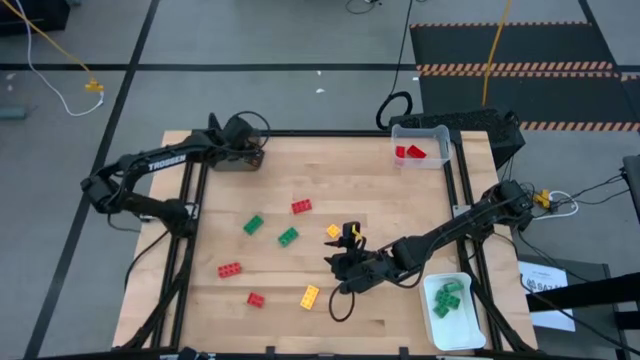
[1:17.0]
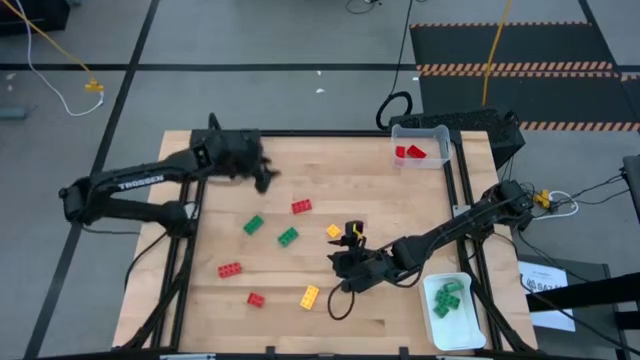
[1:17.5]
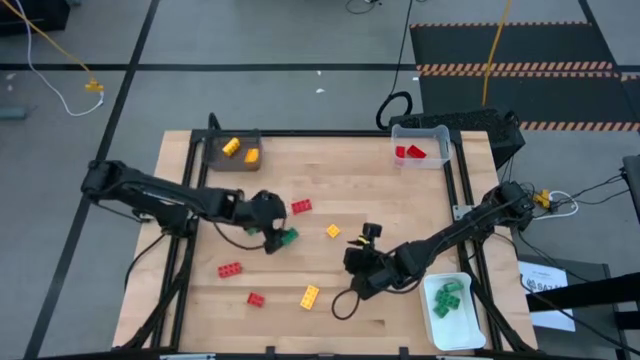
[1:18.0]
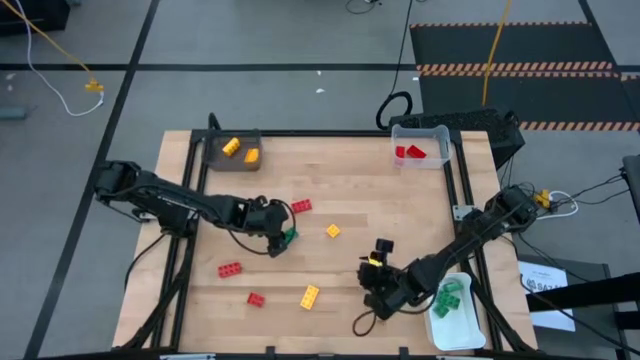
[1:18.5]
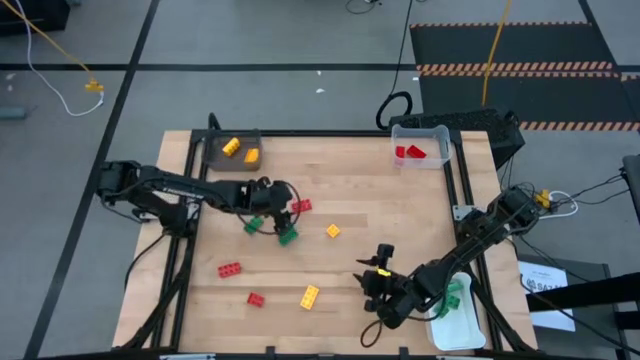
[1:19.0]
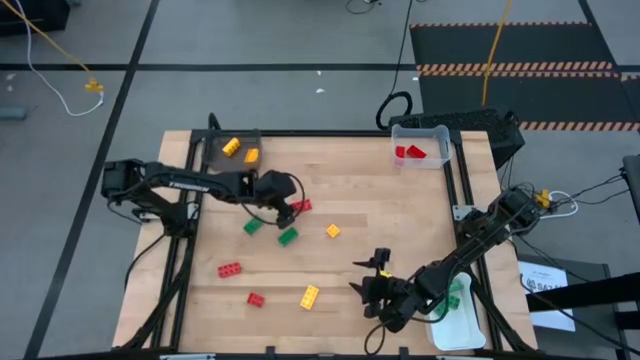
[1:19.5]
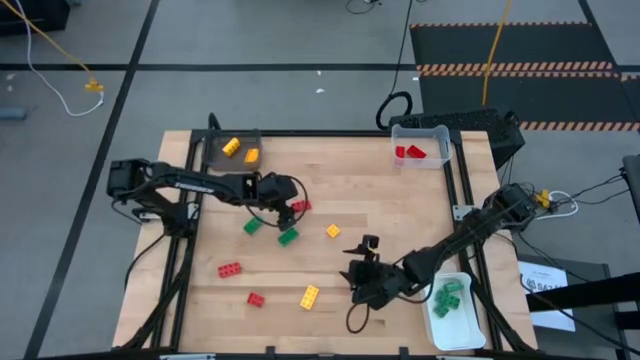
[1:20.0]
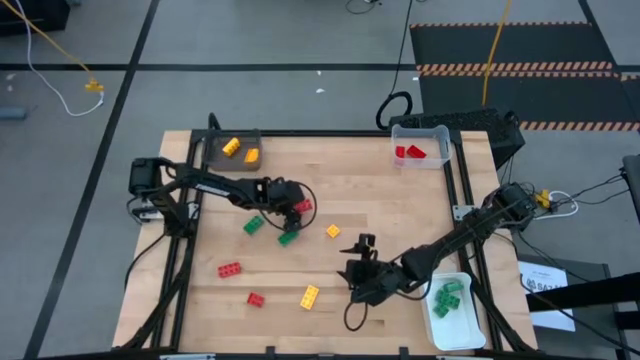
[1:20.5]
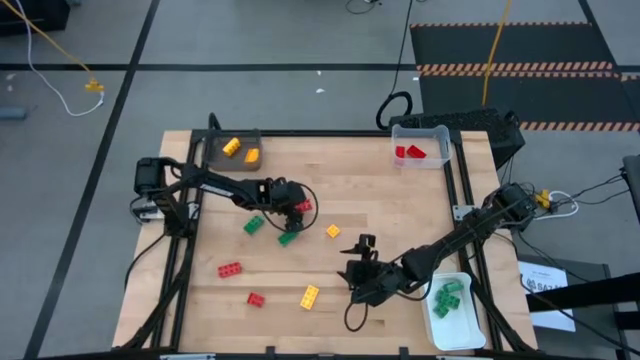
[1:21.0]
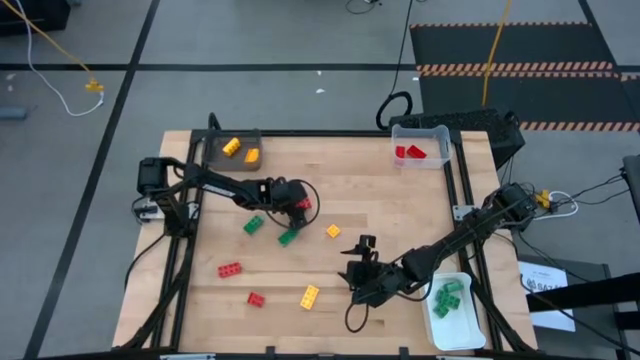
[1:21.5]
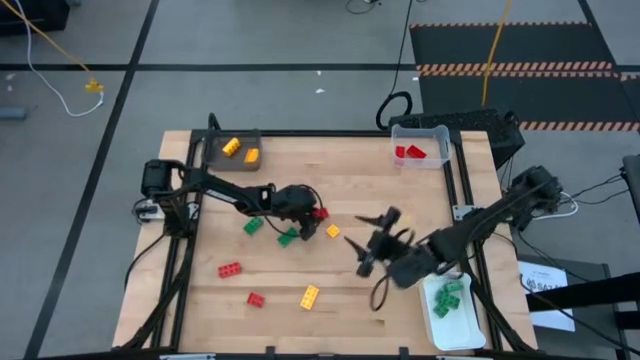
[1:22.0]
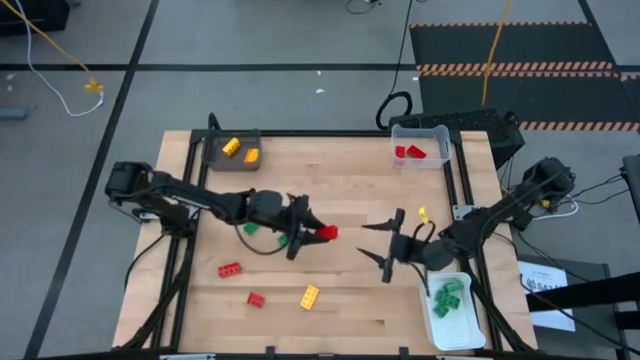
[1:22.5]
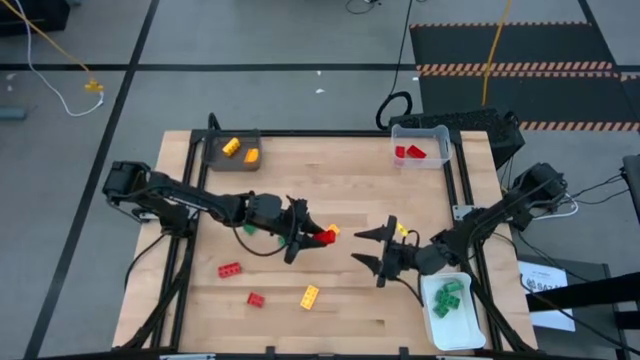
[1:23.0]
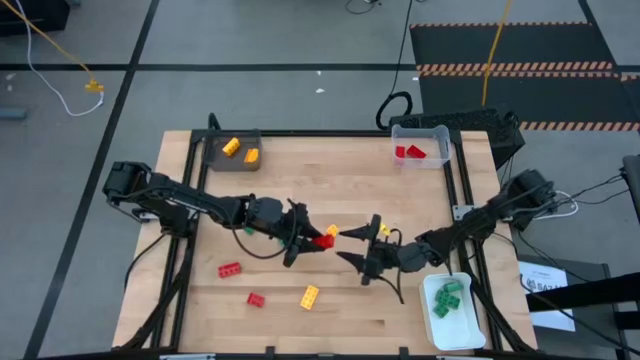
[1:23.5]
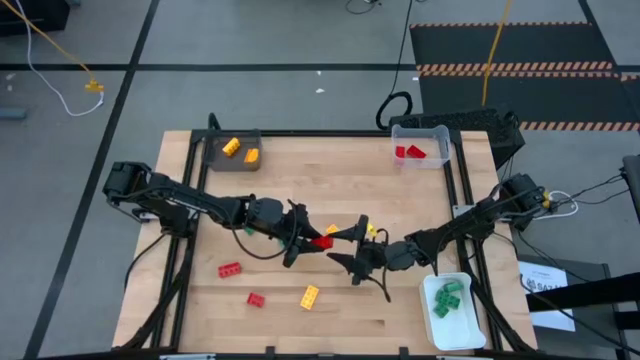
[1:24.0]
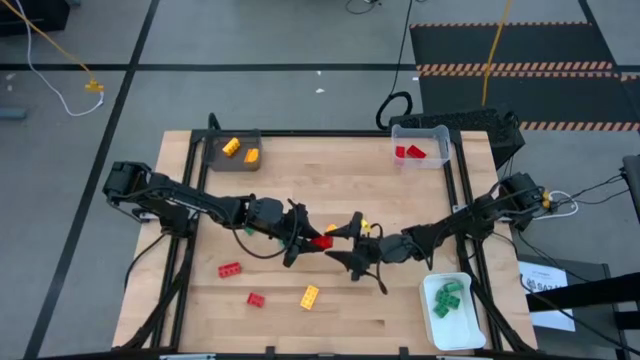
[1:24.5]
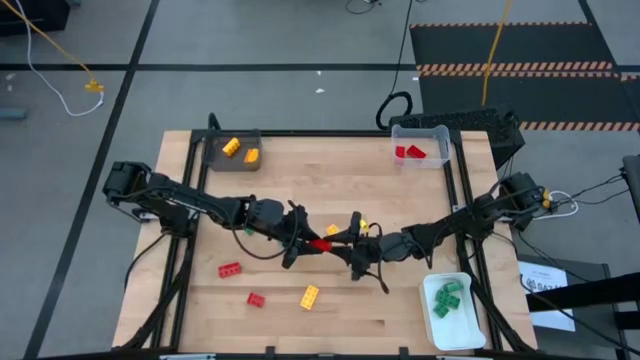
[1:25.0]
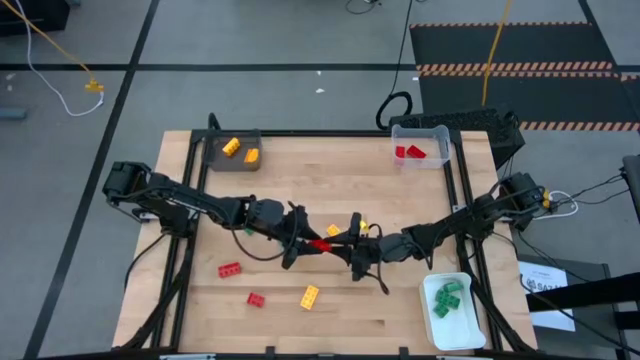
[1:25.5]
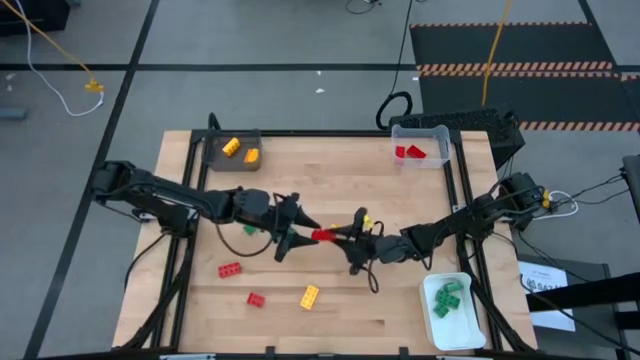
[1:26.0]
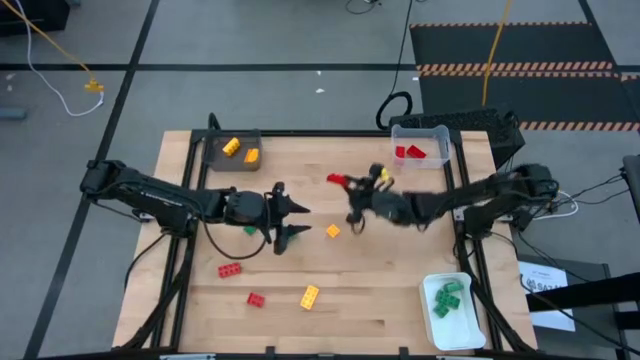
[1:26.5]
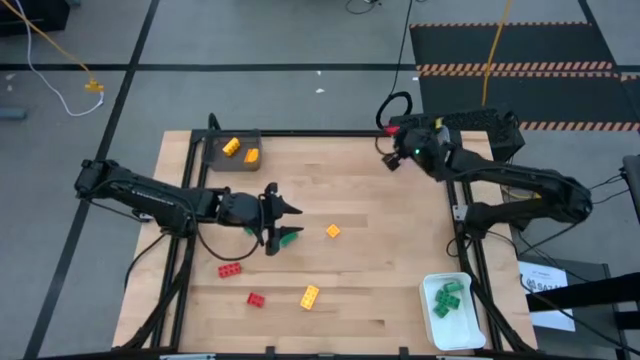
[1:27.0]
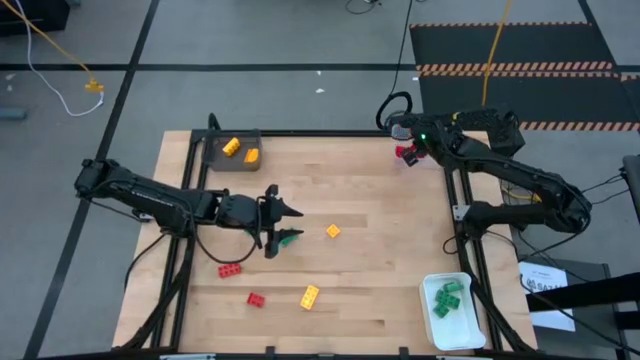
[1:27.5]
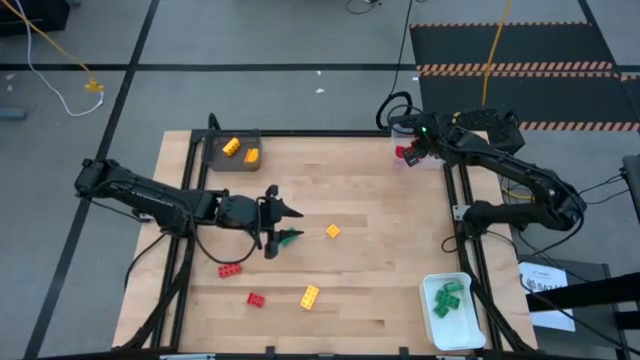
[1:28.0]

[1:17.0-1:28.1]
Task: Sort & place blocks by color
Put the red gamepiece into the transparent bin

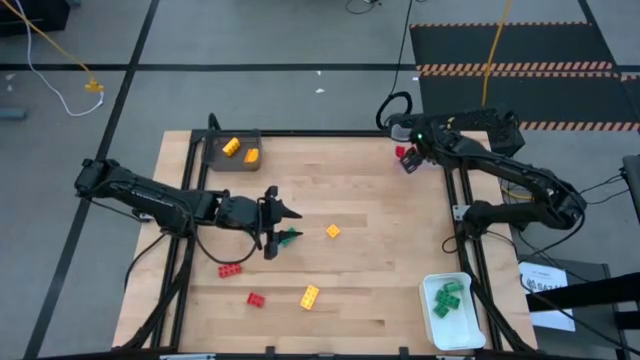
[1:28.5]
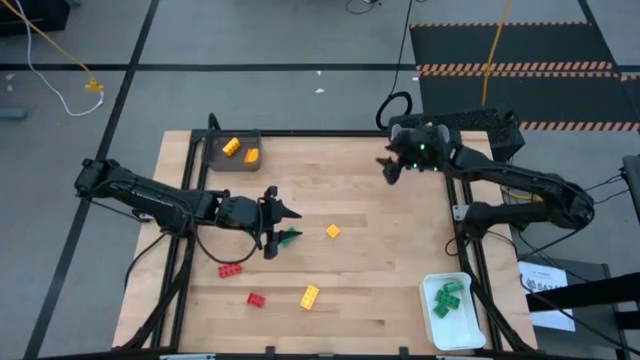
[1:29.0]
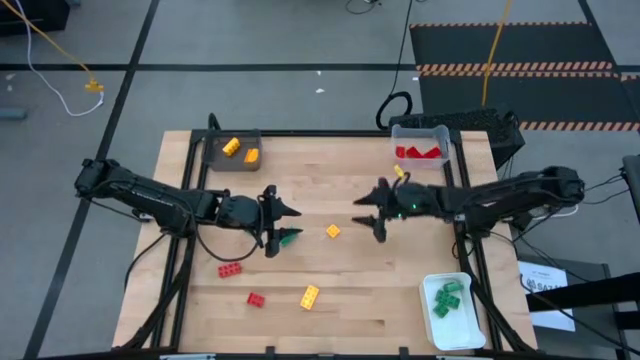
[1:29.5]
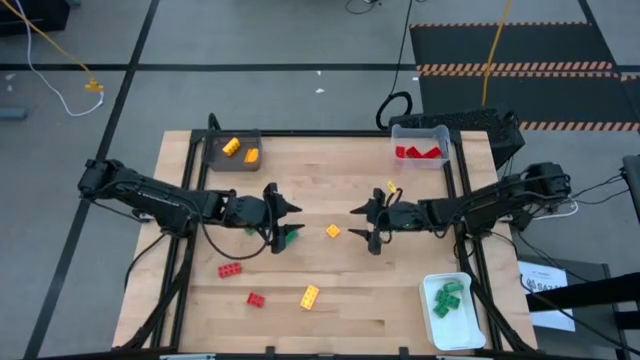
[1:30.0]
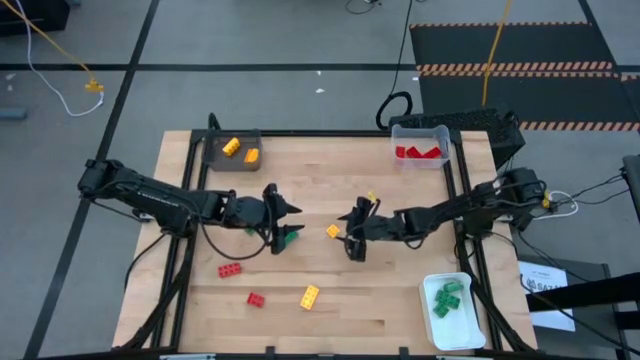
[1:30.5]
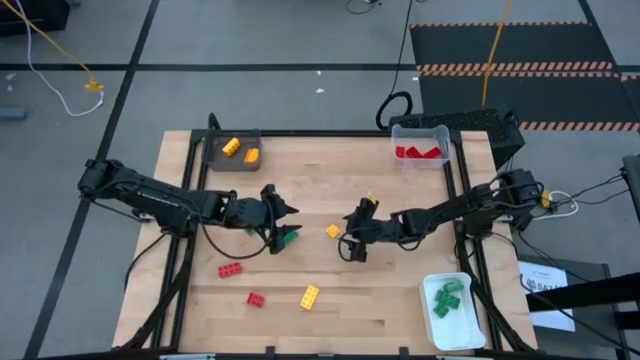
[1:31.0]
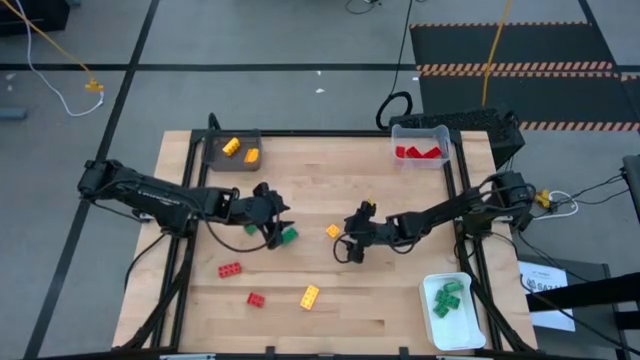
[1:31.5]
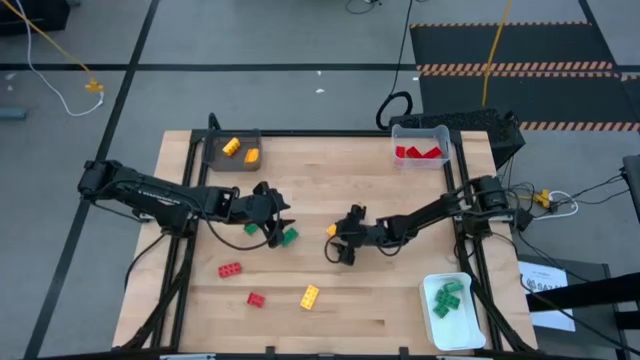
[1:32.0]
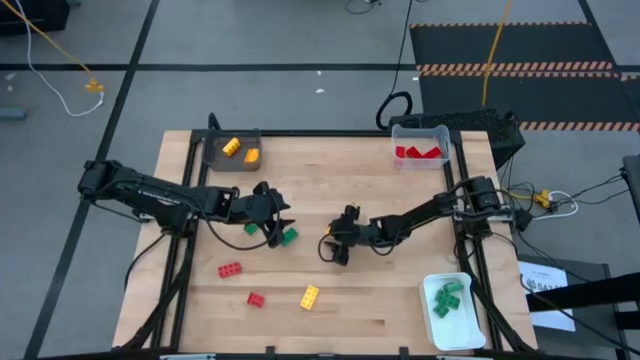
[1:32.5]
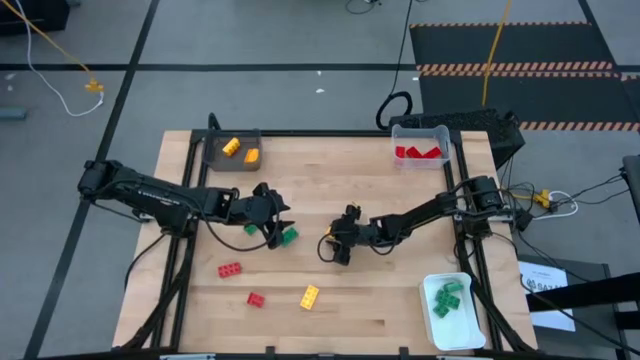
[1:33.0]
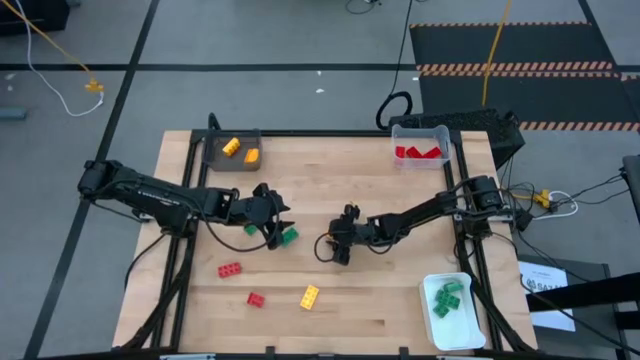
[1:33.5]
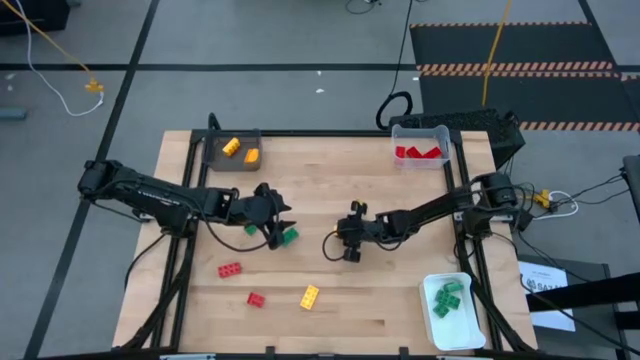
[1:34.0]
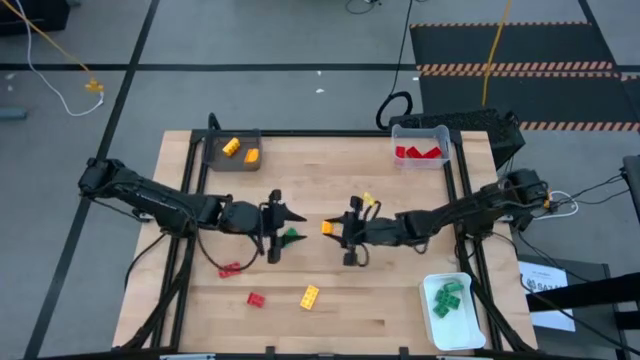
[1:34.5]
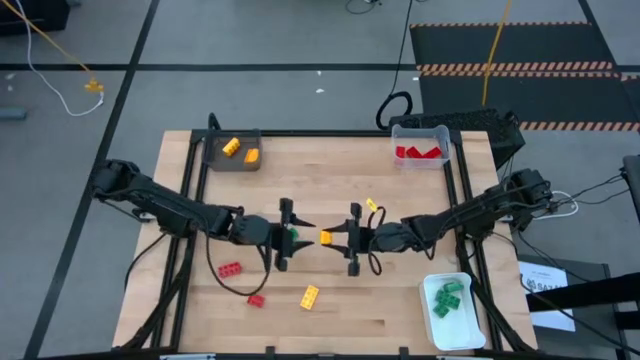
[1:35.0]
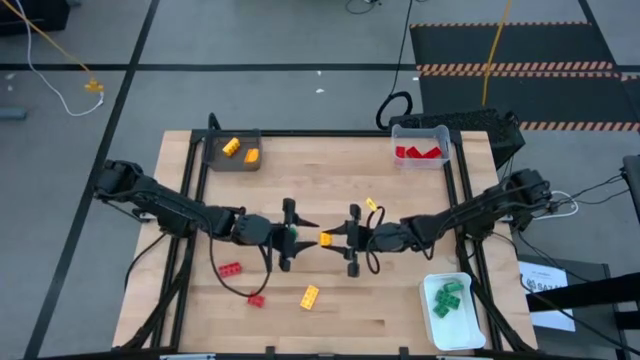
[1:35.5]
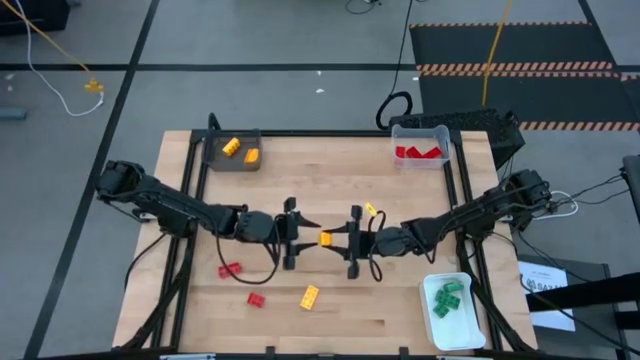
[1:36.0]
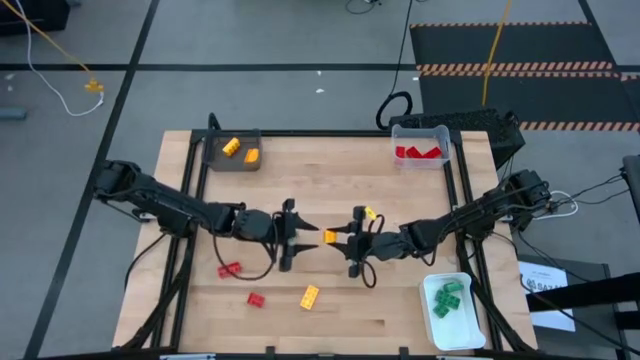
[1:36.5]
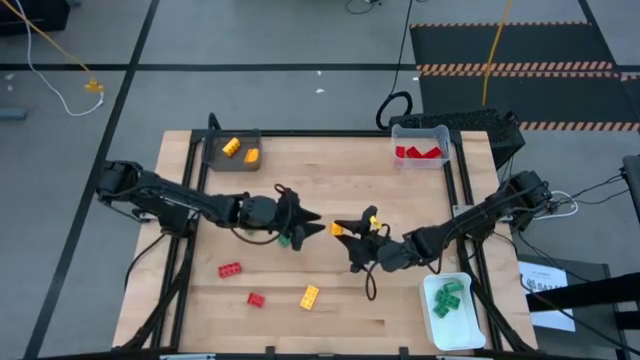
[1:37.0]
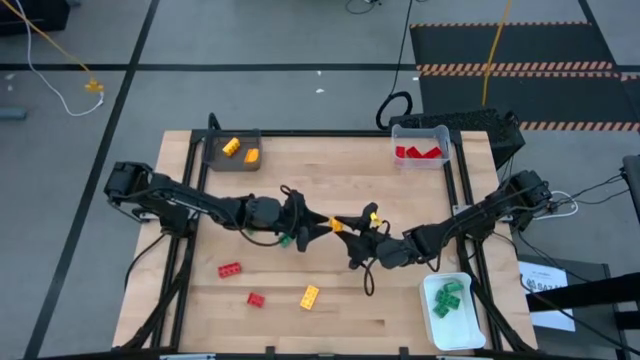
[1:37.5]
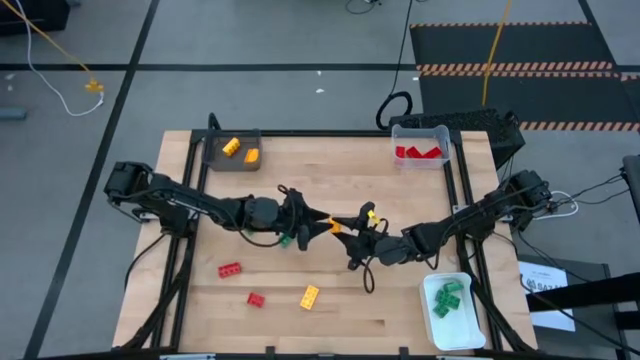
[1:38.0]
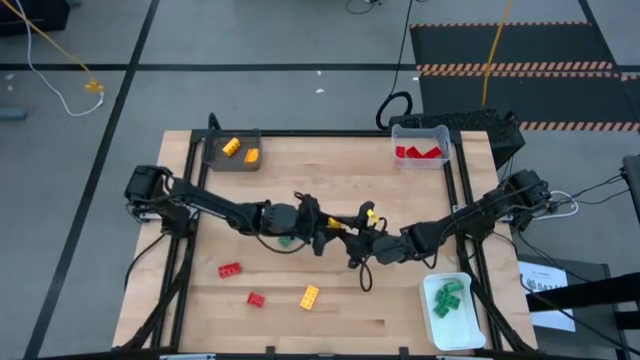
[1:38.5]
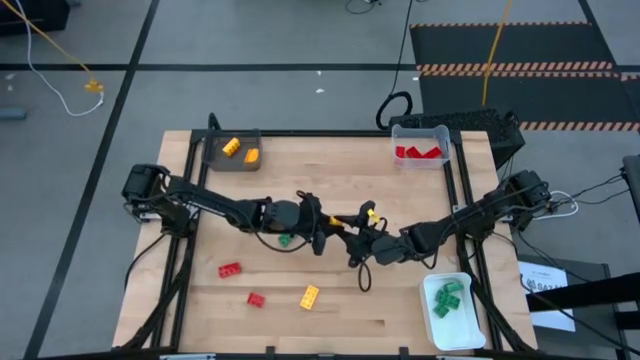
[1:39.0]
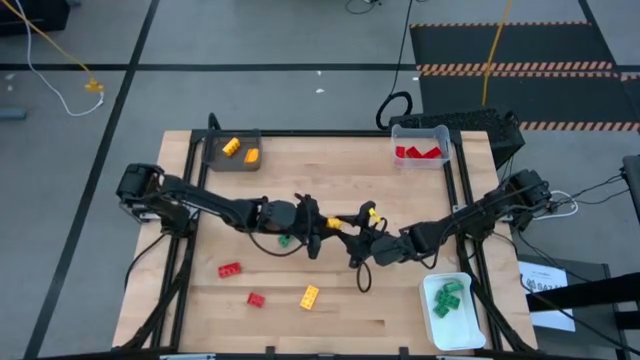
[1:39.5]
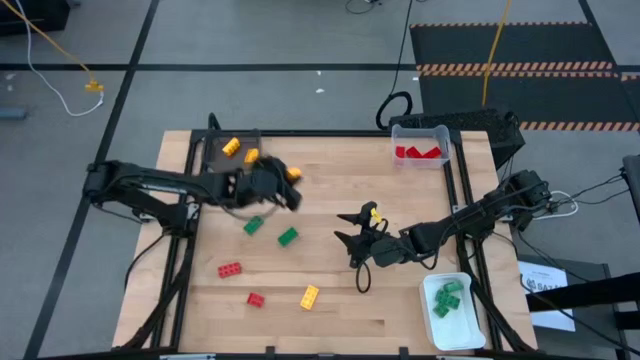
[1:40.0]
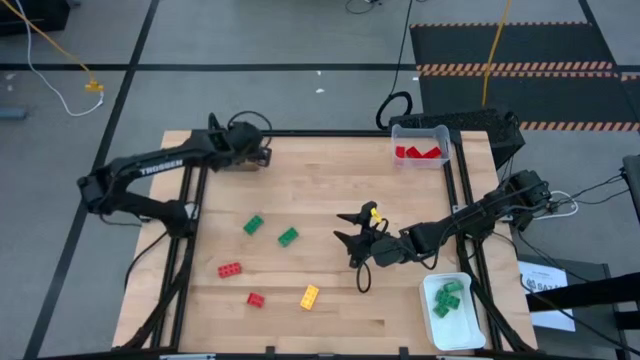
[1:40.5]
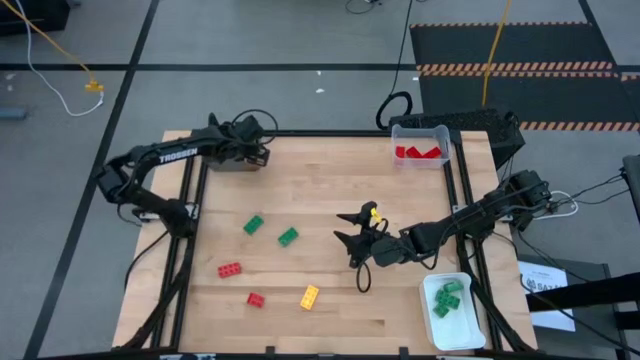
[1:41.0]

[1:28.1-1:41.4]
Put the yellow gamepiece into the black bin
